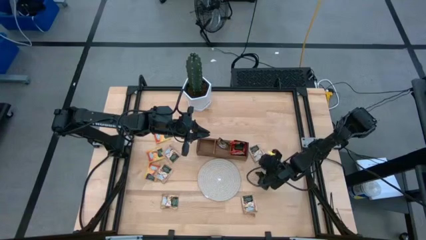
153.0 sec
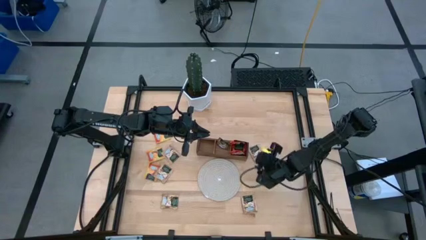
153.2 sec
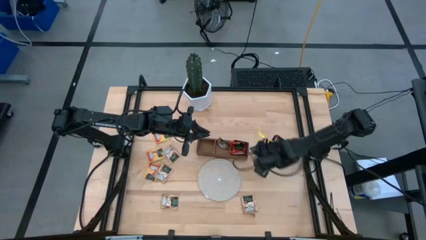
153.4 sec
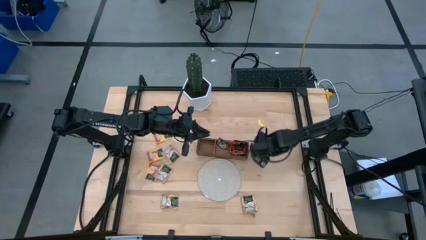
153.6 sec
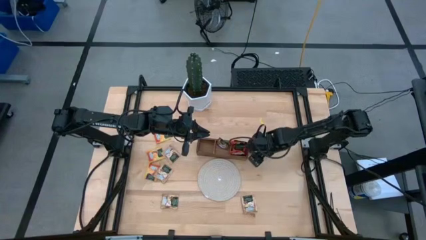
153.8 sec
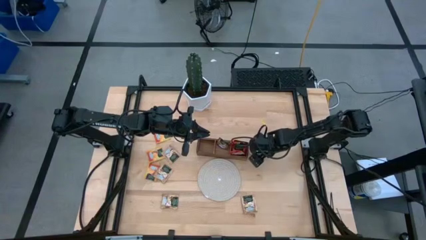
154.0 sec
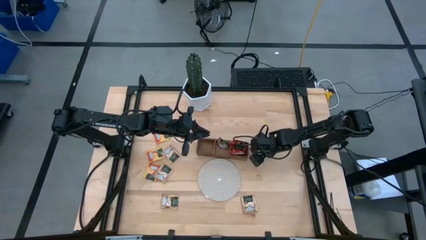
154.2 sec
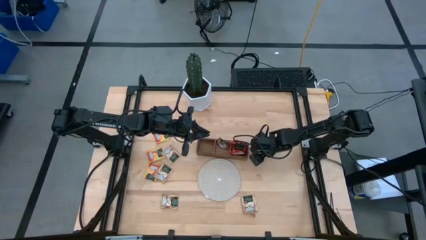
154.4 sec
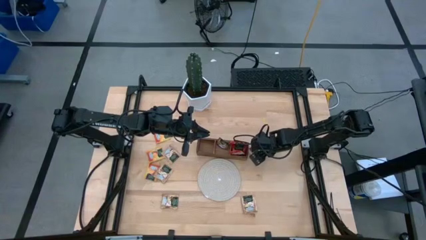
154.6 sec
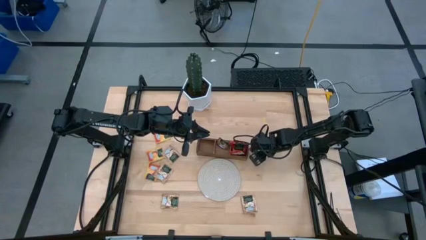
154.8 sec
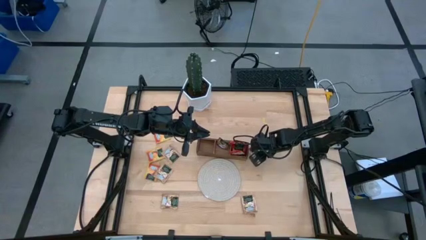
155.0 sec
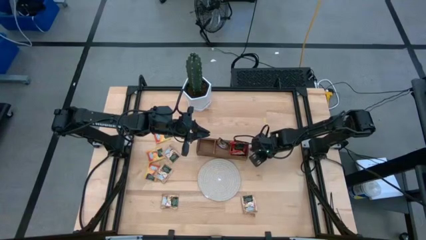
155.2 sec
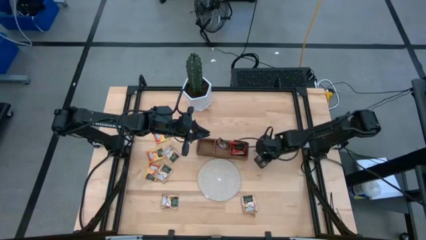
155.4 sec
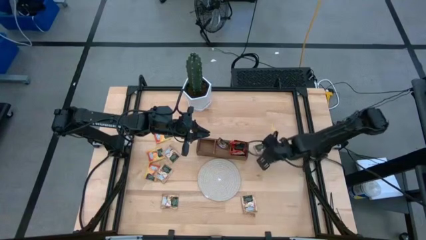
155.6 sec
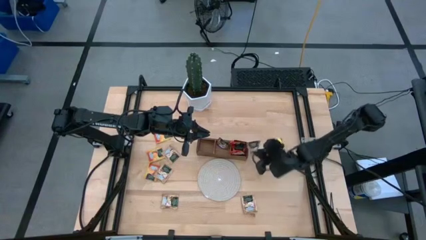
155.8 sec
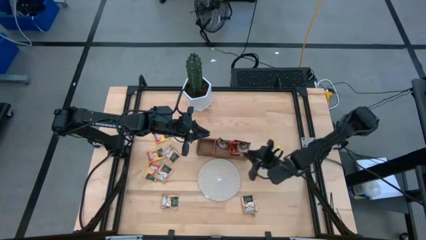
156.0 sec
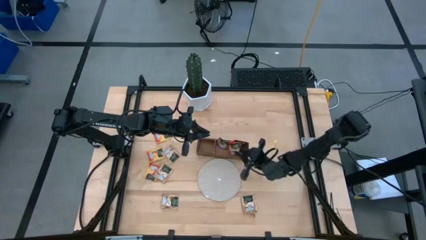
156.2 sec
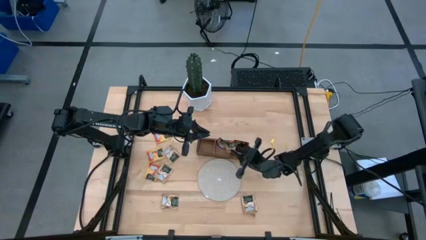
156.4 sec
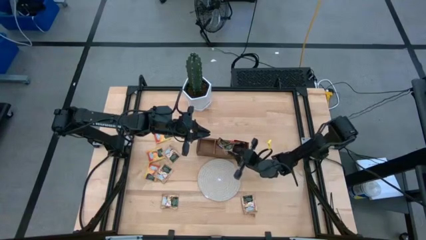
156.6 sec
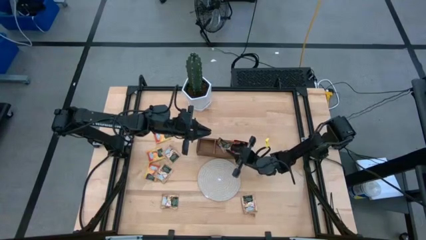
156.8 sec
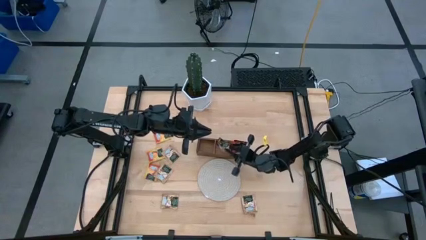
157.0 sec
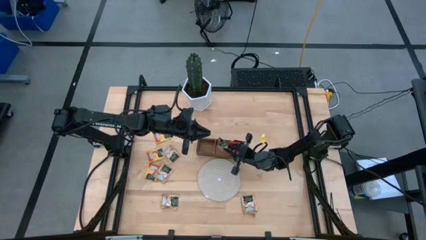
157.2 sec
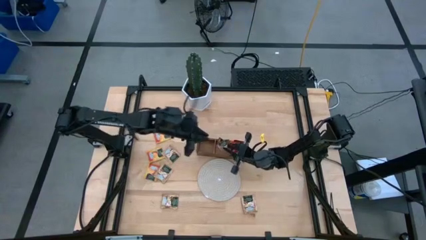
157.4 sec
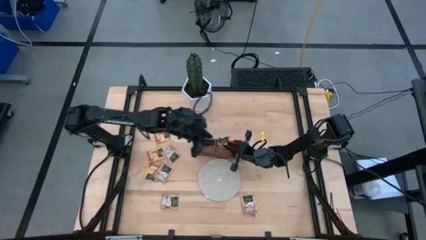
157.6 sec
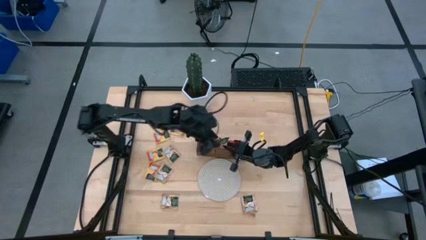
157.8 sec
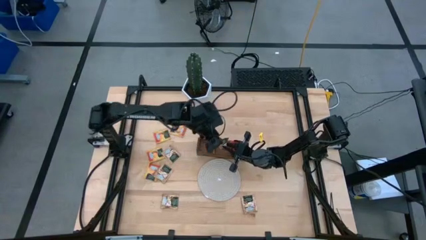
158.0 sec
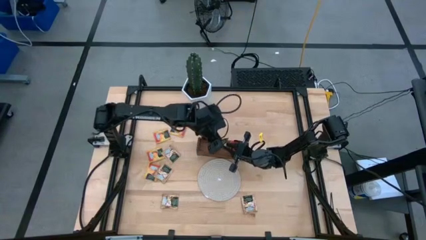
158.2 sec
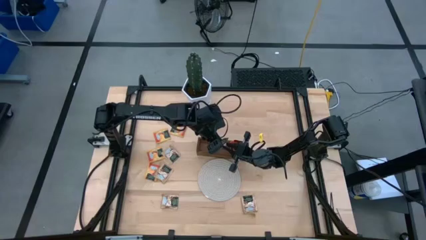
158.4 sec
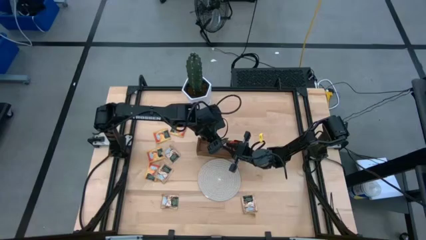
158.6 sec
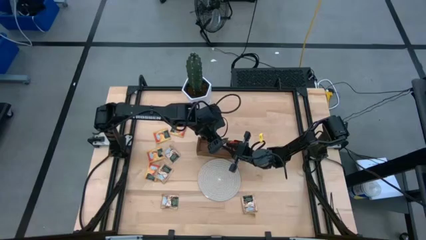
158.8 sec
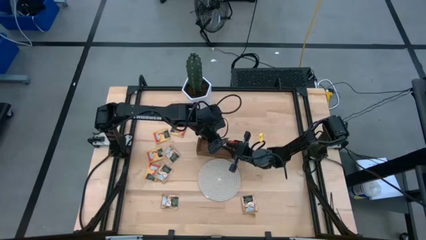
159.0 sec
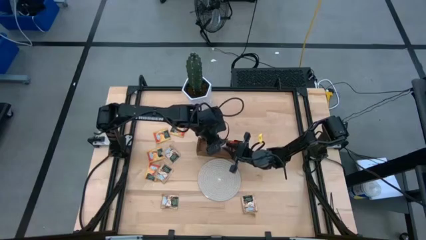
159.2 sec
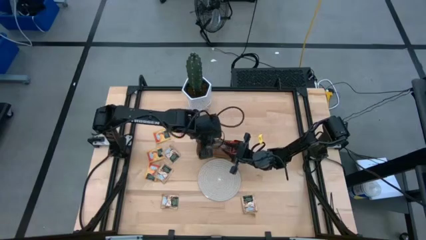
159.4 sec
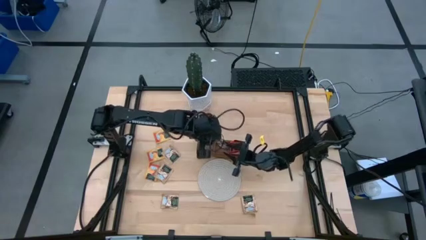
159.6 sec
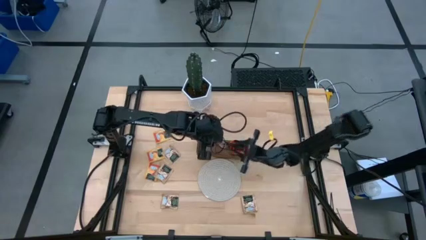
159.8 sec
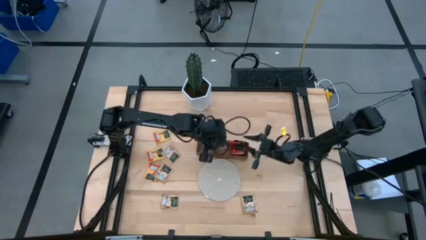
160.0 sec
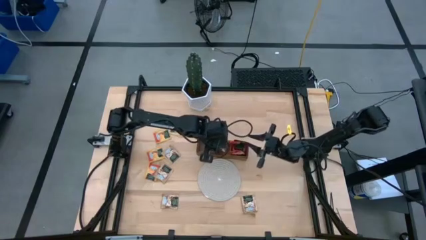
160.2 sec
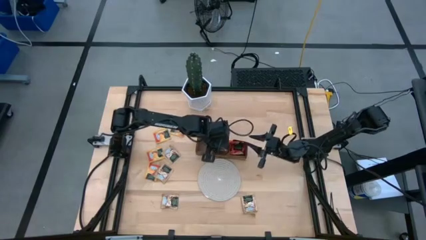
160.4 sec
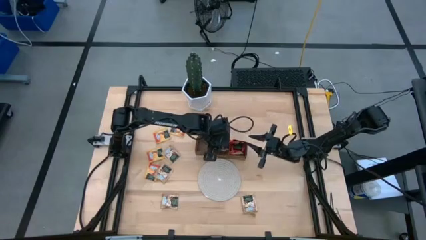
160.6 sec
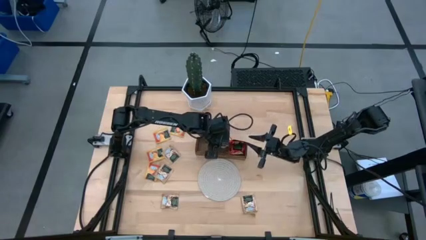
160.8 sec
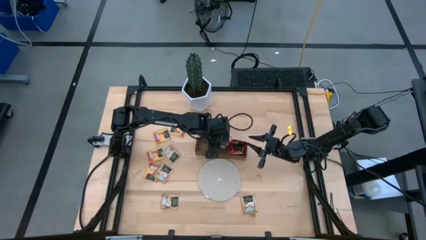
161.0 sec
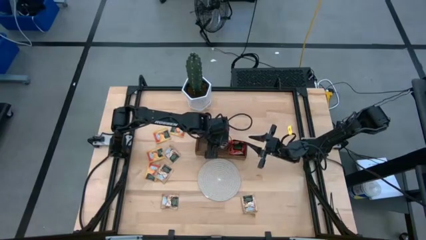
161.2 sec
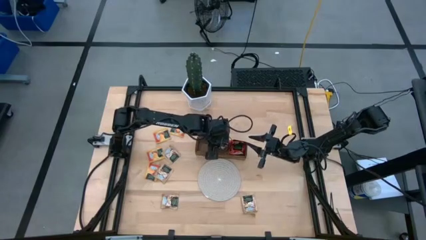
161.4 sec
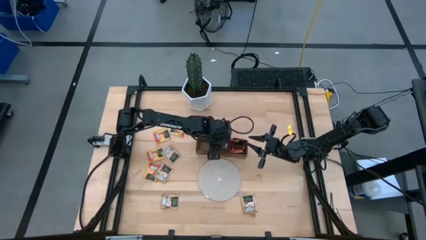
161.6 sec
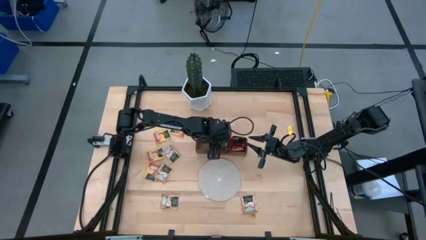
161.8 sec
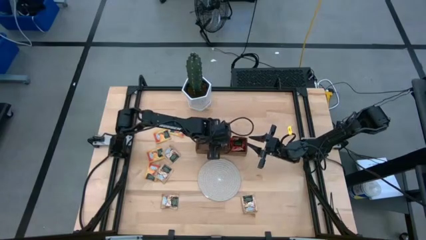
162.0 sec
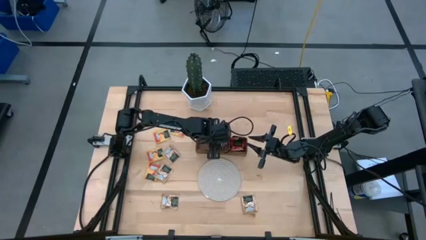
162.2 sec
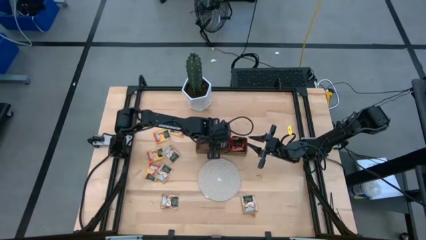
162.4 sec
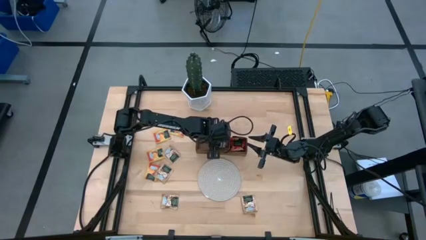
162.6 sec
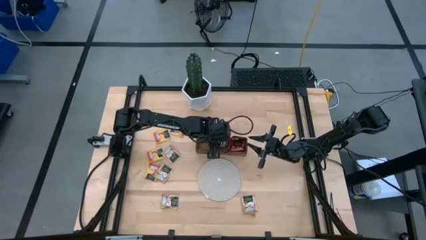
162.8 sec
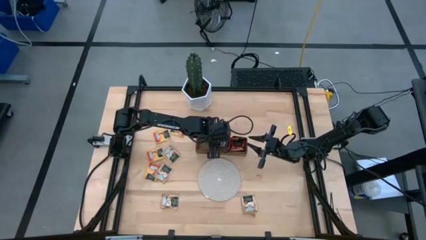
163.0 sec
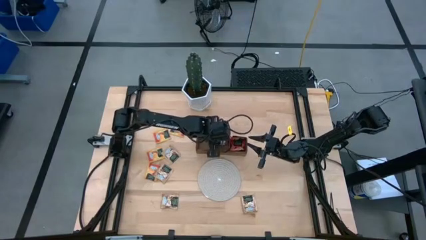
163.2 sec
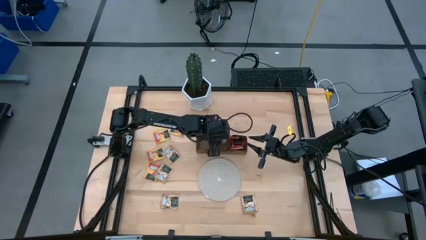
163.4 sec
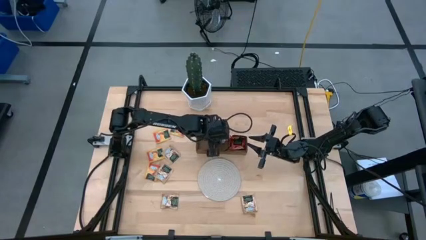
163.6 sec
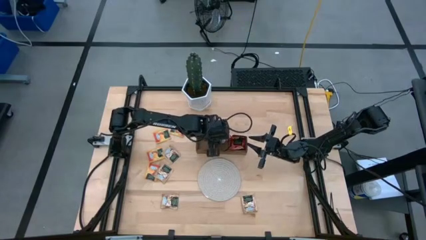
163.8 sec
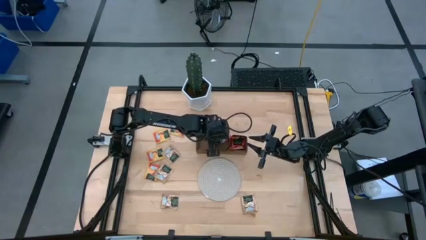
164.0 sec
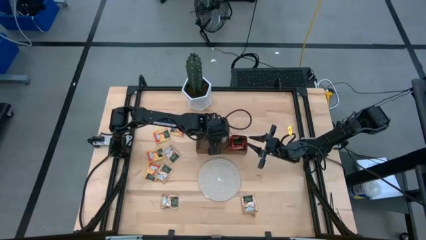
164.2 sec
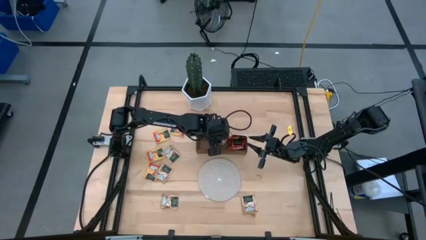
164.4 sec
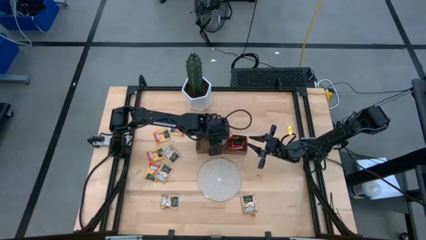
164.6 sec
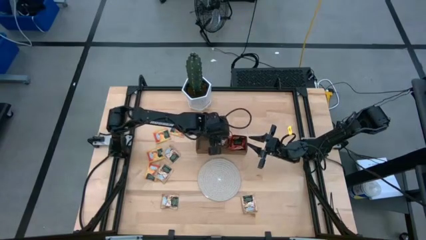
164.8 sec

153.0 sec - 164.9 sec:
Task: Pick & Place Tea
Put the brown tea bag into the middle section of the wooden organizer

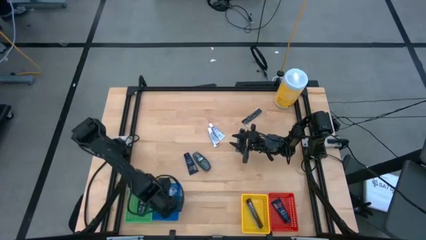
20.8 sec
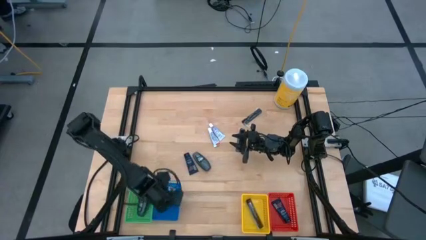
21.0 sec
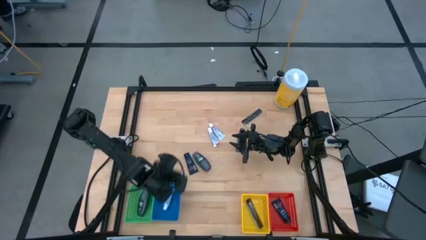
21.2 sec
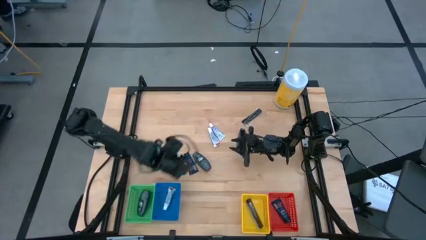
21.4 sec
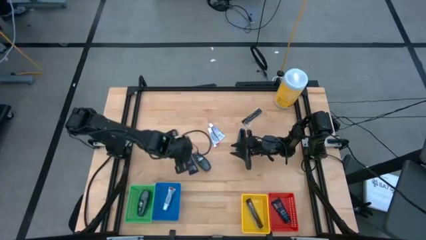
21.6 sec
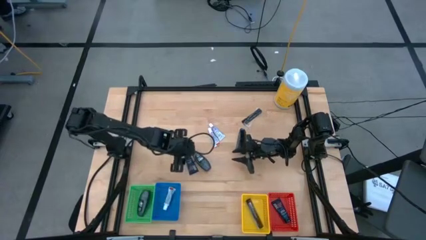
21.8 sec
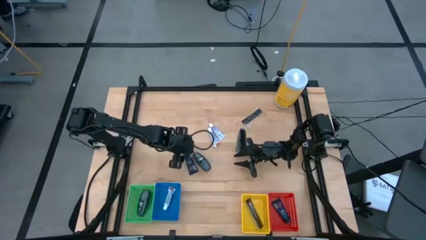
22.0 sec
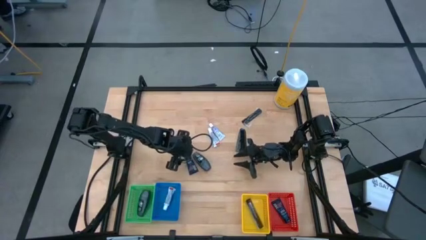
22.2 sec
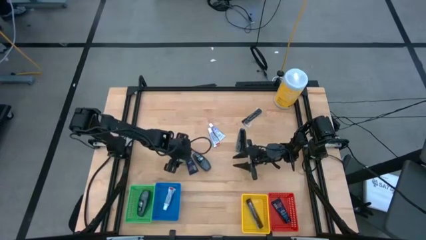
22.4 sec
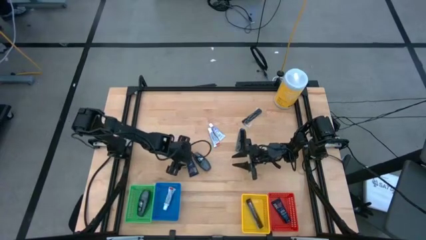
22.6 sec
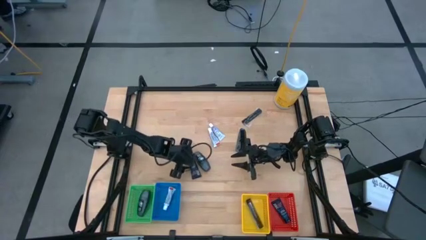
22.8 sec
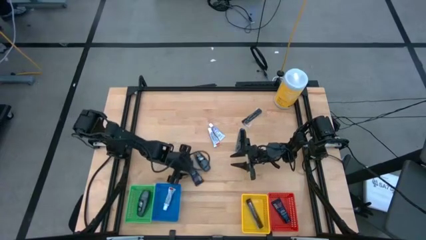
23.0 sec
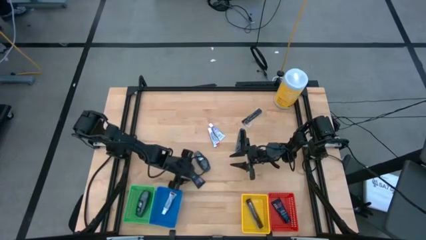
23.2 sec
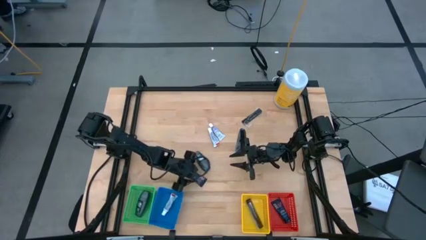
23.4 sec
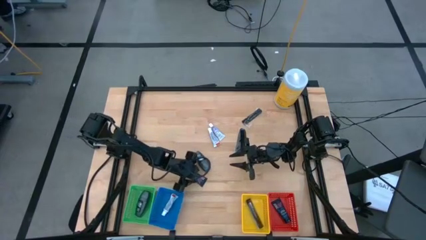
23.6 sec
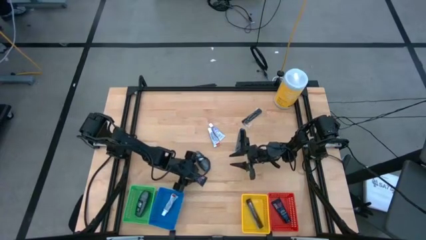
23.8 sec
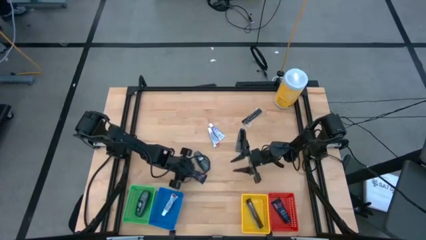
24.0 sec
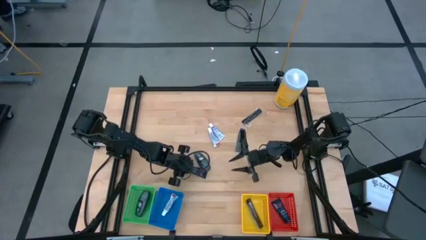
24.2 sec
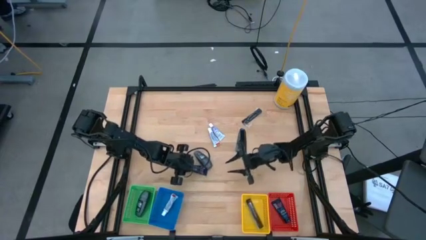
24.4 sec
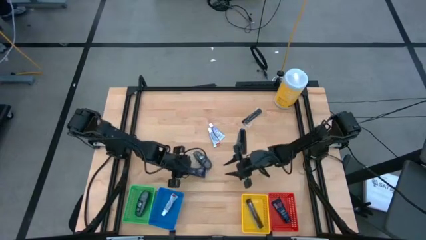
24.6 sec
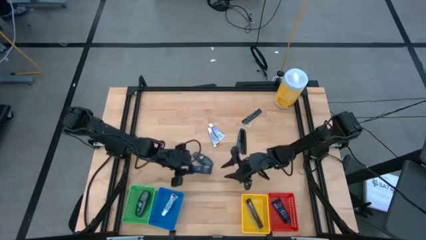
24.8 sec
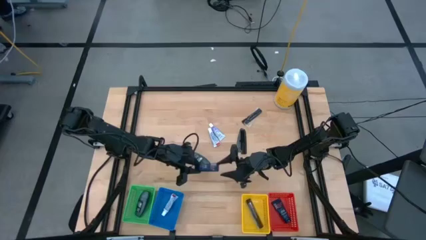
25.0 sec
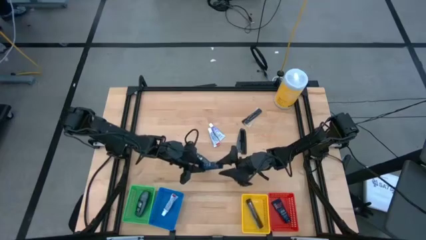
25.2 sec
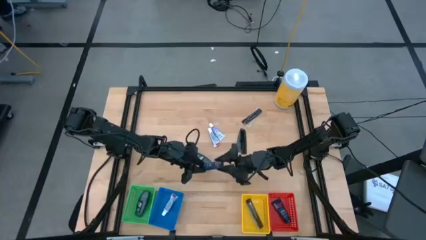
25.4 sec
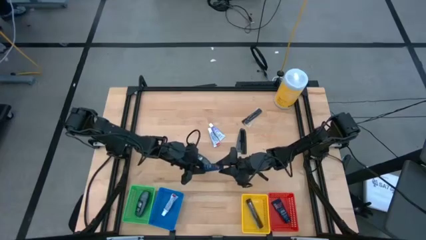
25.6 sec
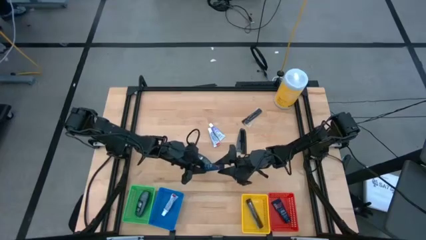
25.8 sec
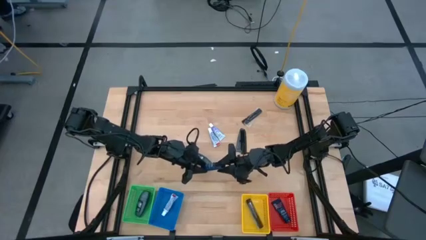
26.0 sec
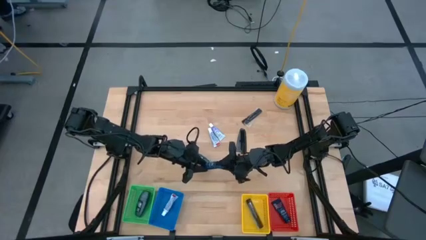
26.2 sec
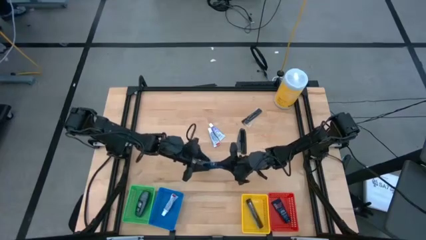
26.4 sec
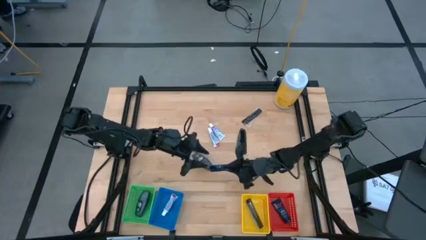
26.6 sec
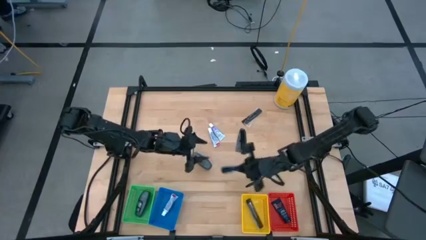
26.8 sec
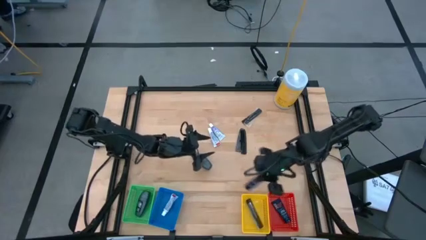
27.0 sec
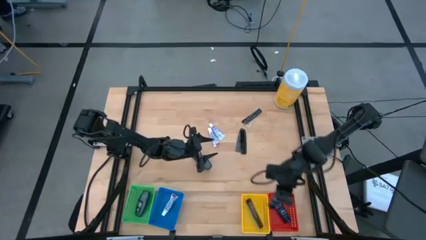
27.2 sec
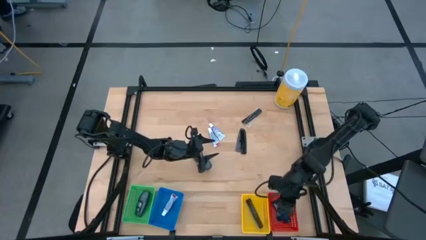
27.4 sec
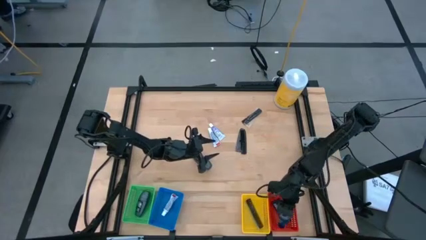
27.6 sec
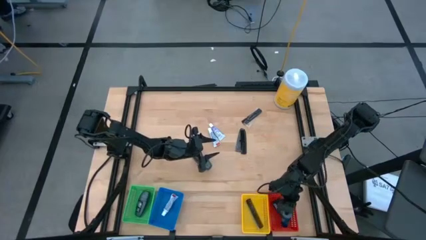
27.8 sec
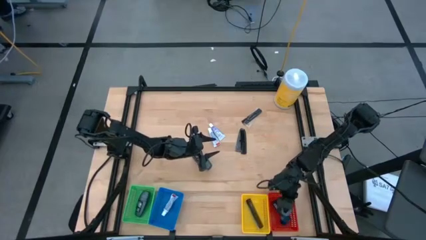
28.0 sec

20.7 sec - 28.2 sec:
Task: Pick & Place Travel size toiletries
Put the blue shave cream into the orange bin
